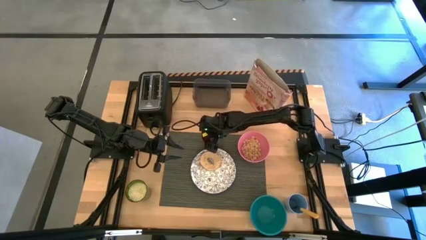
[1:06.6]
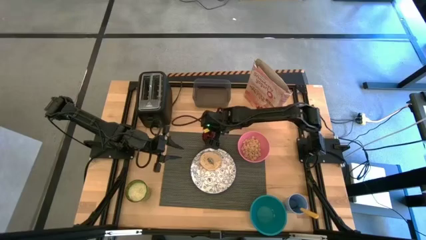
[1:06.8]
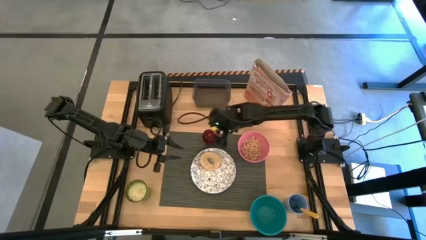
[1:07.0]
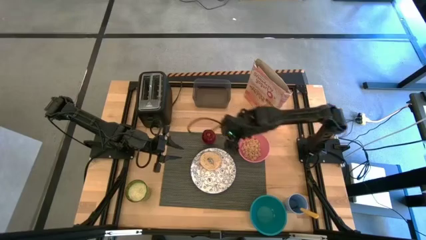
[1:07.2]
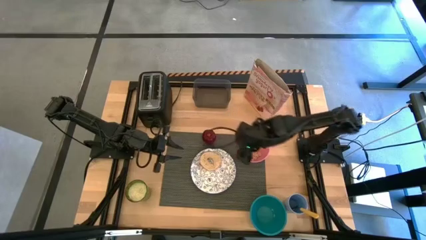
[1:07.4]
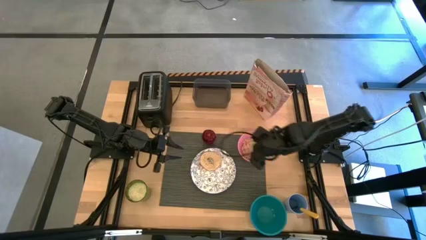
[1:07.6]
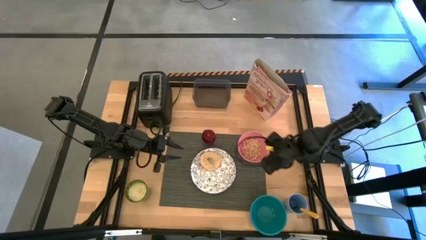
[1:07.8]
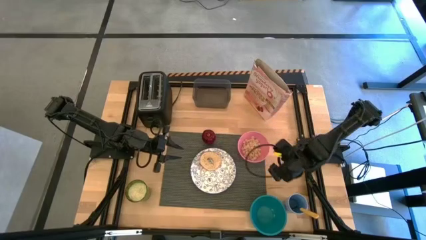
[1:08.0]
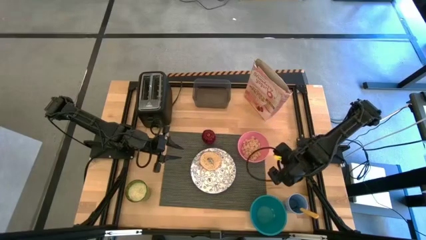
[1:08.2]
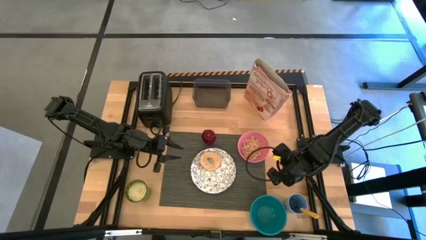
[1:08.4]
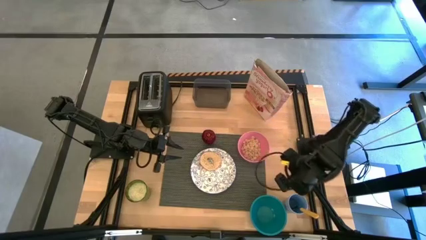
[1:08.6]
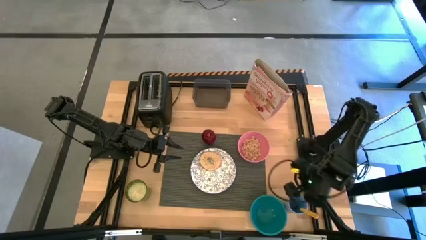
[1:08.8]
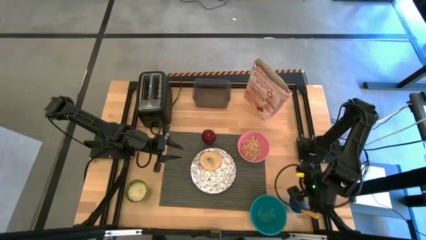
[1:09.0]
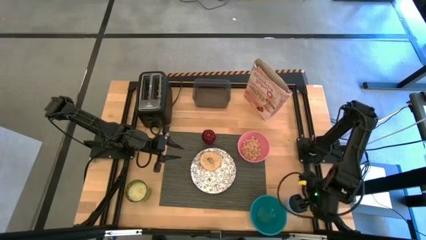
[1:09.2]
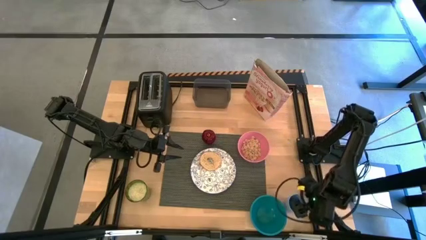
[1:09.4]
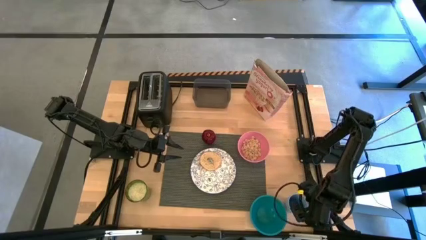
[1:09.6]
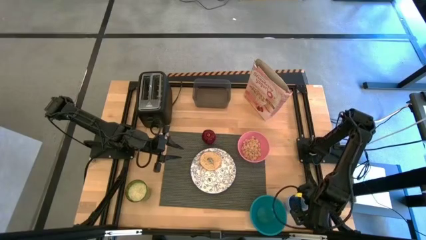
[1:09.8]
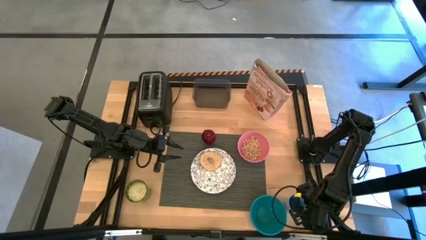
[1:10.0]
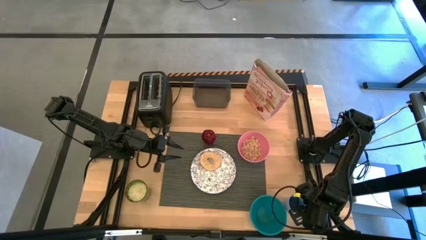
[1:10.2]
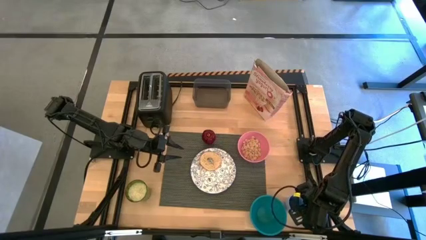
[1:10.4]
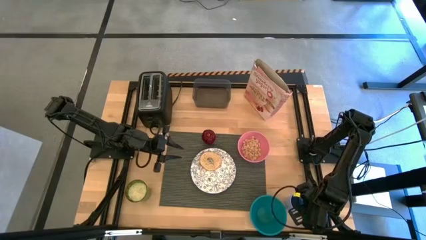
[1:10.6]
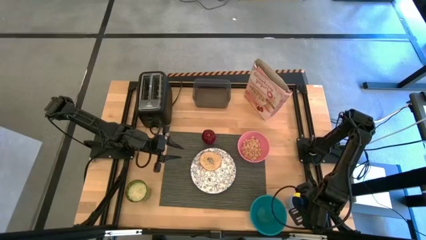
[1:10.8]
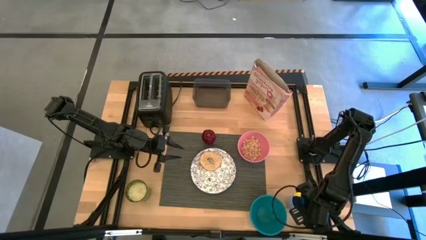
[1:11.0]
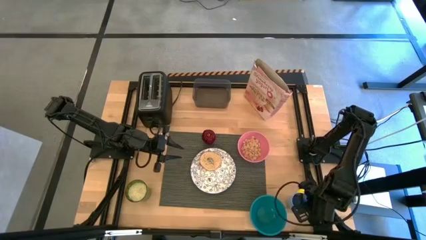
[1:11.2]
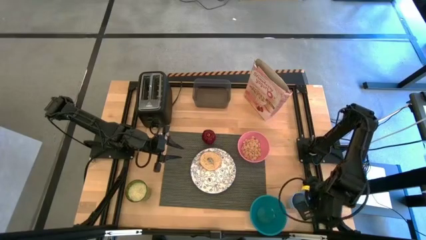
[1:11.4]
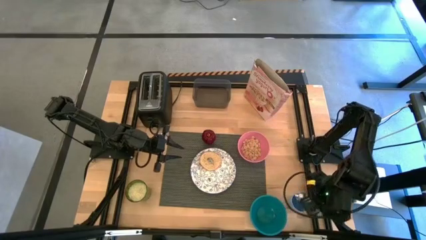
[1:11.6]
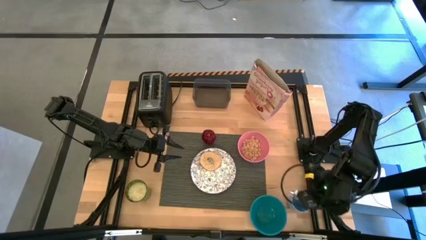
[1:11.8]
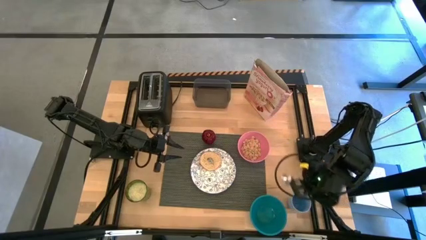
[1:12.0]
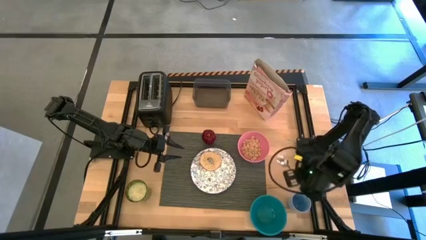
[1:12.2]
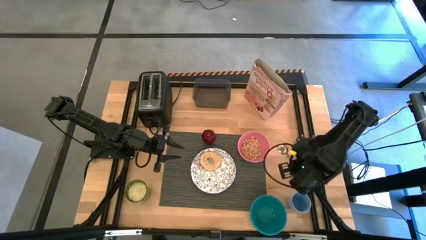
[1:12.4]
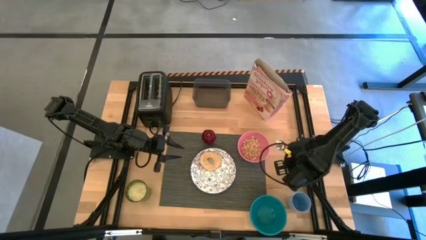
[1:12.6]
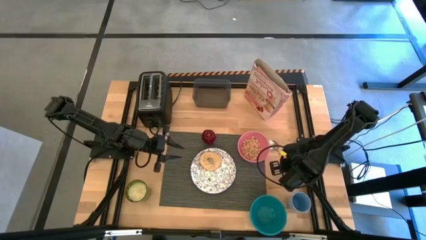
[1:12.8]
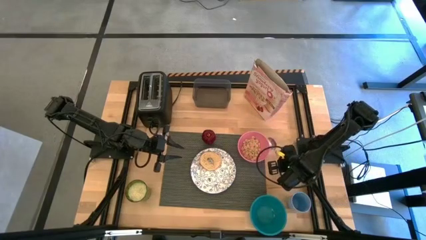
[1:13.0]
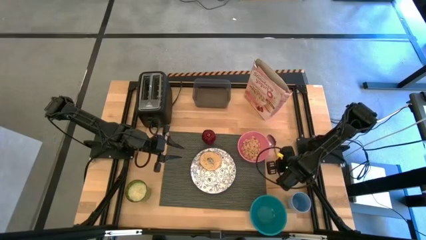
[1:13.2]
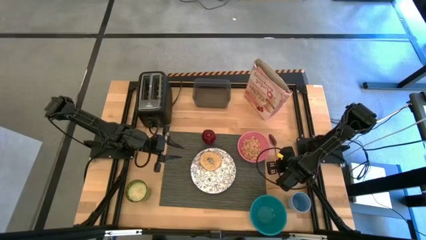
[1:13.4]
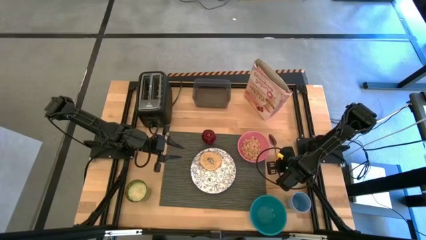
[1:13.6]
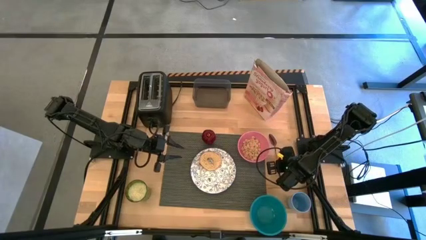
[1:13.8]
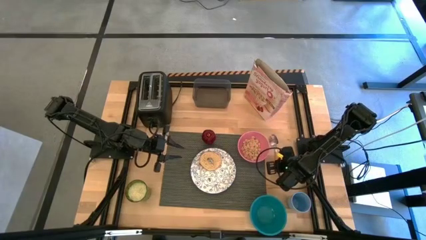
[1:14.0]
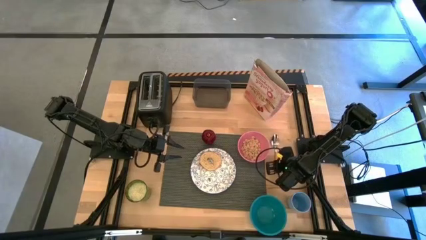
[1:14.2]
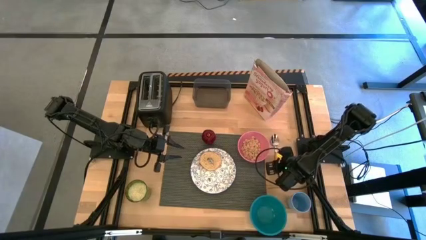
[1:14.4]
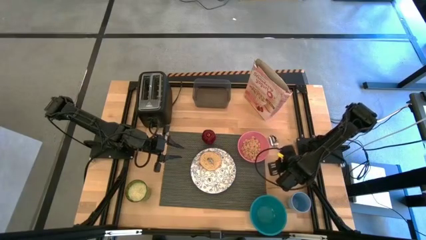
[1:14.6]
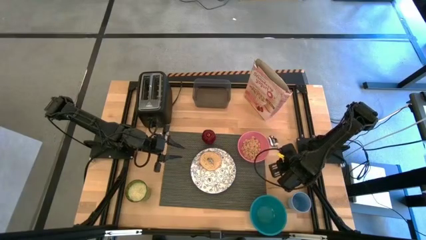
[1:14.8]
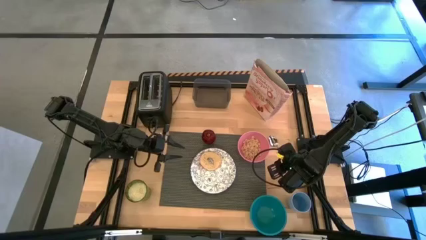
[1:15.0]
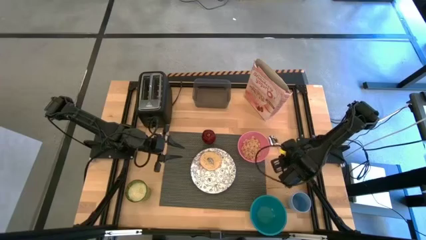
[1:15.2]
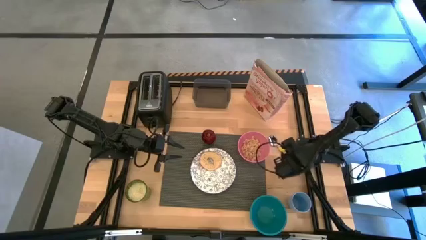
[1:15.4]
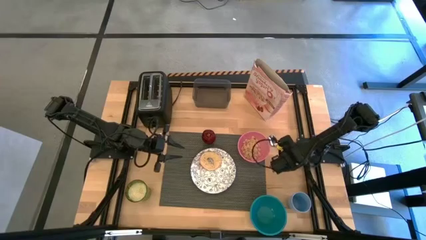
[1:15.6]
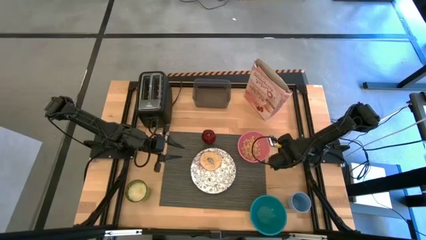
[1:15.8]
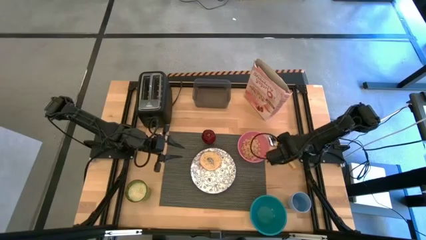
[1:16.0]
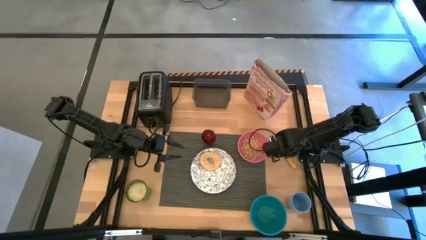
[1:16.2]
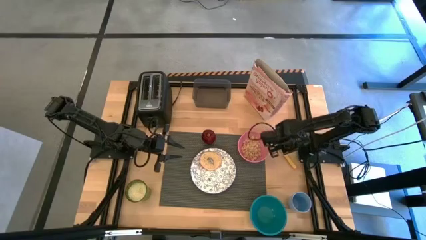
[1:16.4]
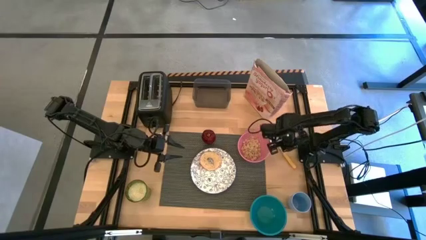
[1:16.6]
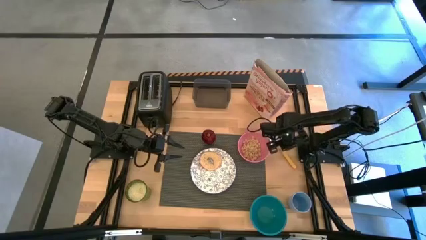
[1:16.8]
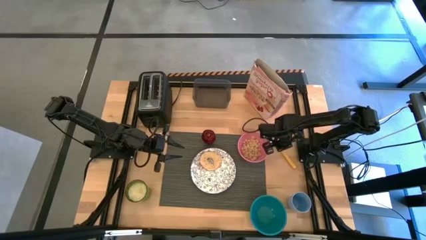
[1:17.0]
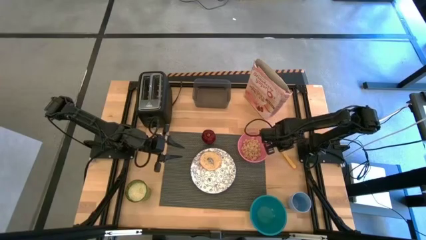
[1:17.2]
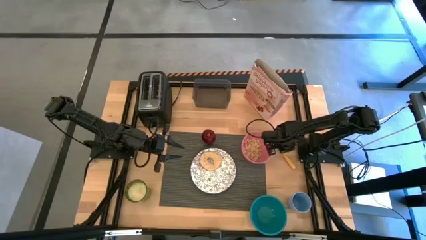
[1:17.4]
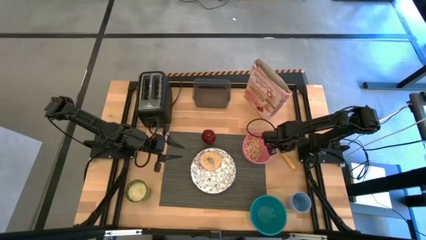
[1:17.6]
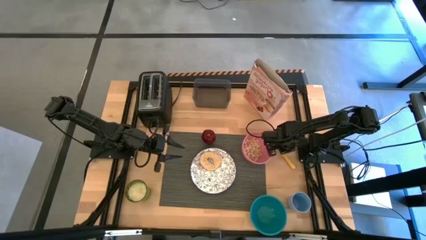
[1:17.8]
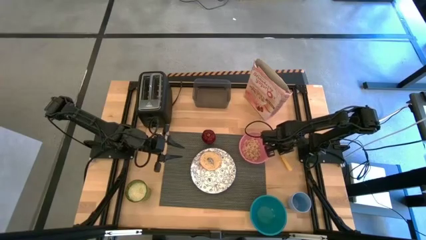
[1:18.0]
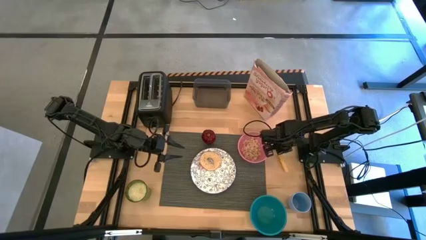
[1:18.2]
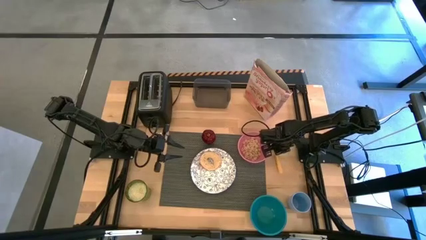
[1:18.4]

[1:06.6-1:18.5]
Task: Arrange a breakfast setting
Put the spoon to the right of the pink bowl

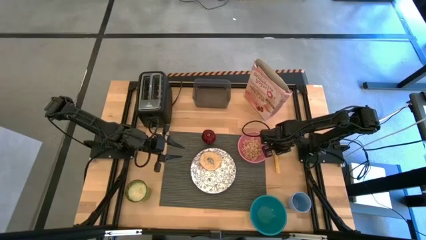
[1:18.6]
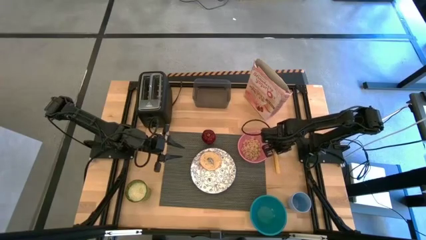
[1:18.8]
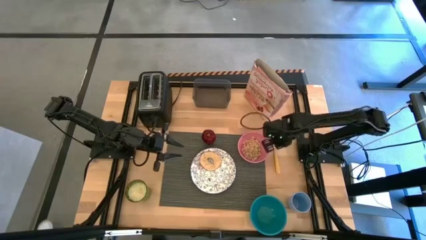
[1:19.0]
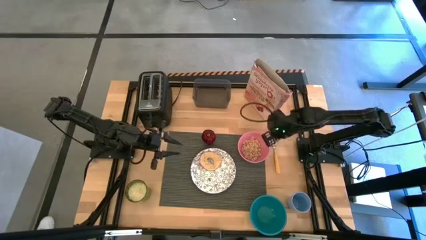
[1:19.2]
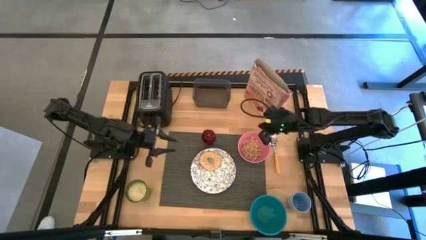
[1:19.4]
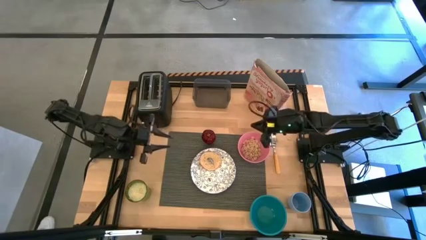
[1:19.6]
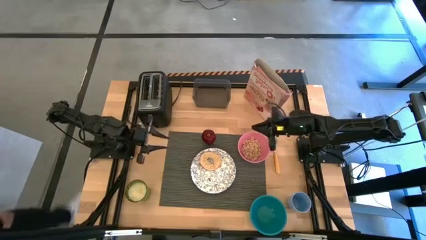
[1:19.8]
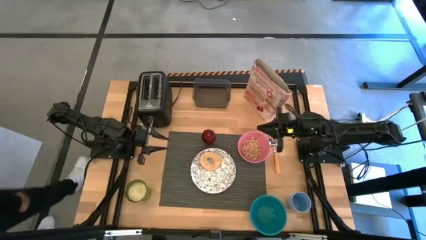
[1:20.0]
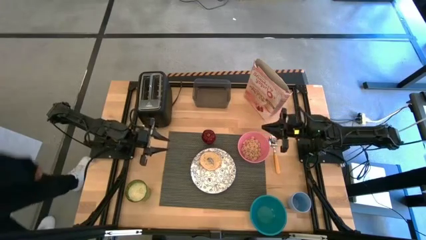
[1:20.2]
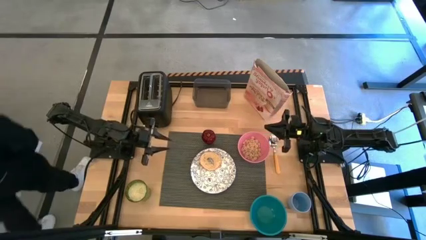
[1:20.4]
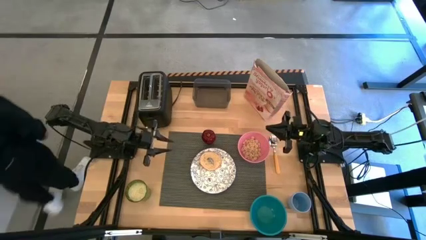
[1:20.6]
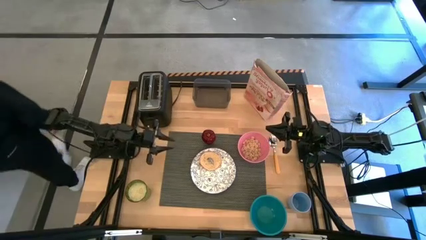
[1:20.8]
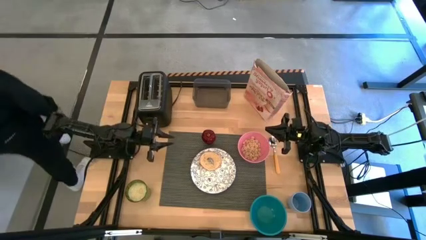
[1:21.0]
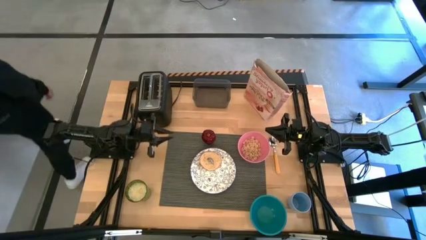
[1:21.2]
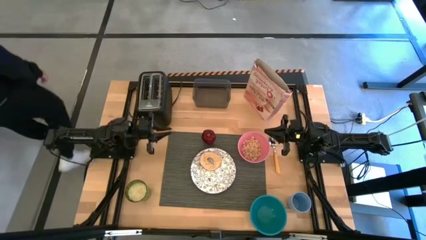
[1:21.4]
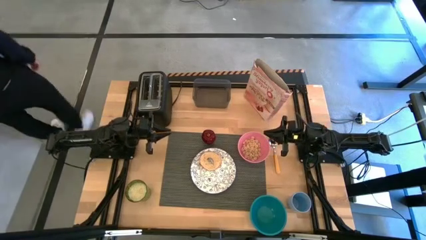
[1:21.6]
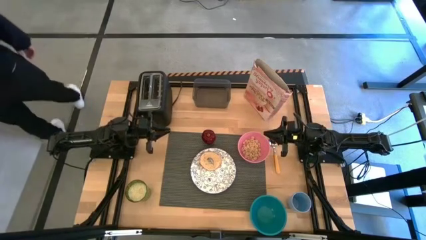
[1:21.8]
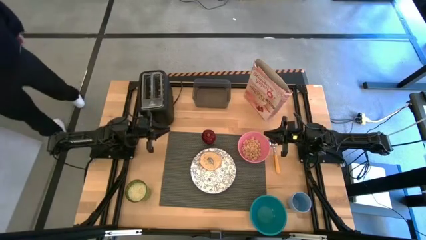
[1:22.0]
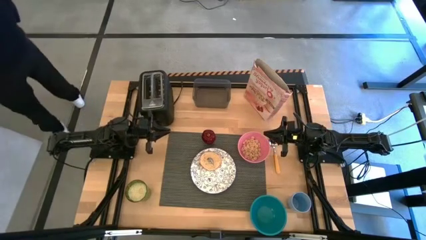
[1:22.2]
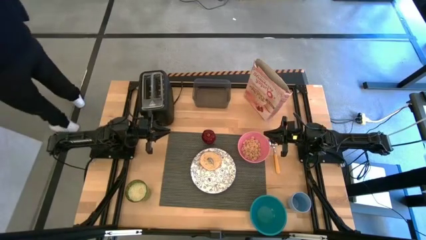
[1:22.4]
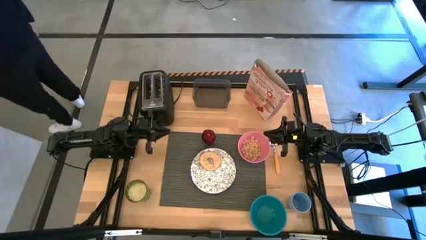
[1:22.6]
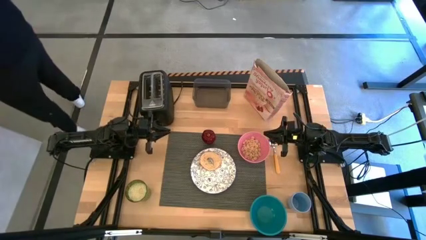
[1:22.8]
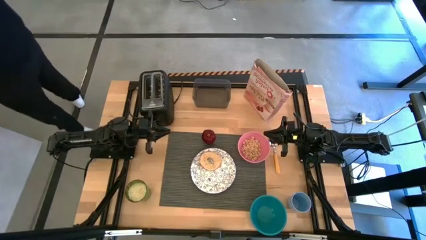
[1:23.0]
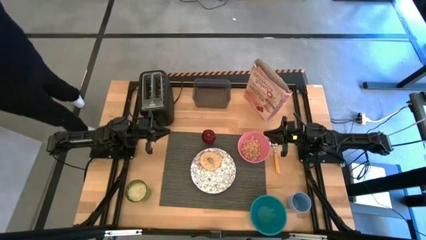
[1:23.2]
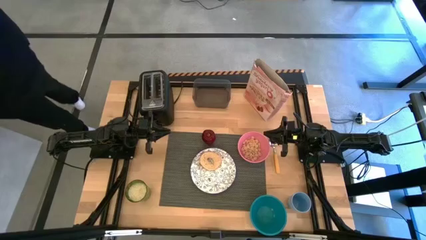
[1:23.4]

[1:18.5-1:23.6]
Return to Home Position

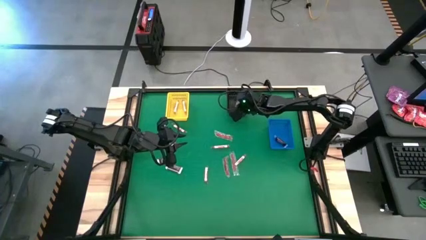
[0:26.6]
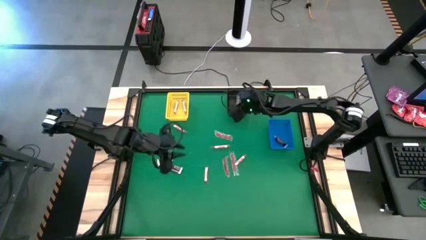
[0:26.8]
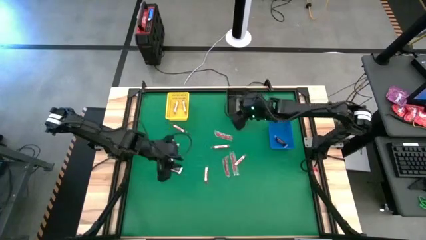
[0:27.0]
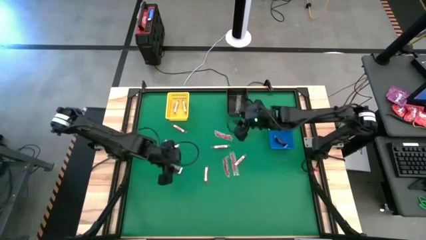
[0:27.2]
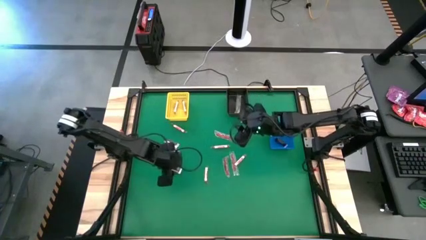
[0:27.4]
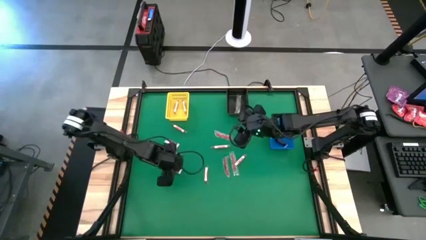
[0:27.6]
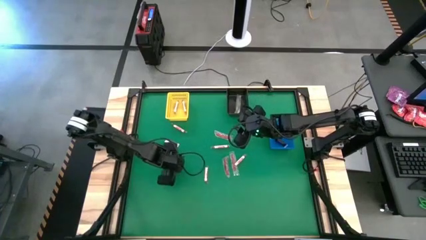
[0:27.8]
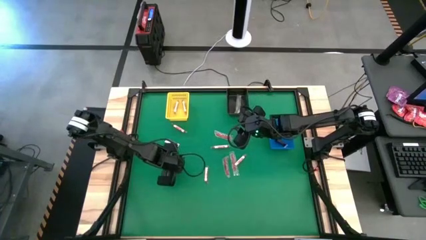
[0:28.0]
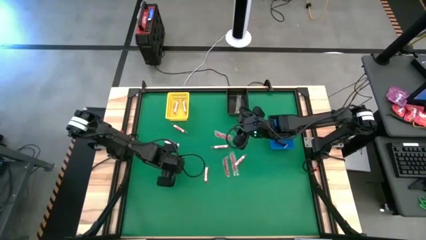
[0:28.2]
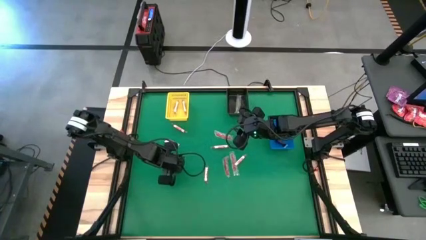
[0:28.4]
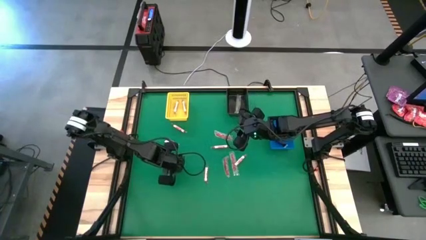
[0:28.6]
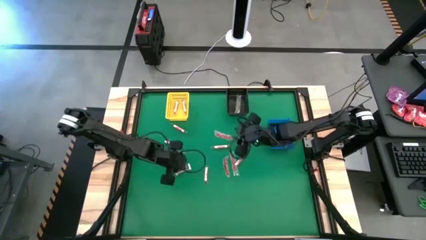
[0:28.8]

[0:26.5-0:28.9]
Task: Sort candy by brand, put in halloween buckets
Put the brown chocolate into the blue basket
